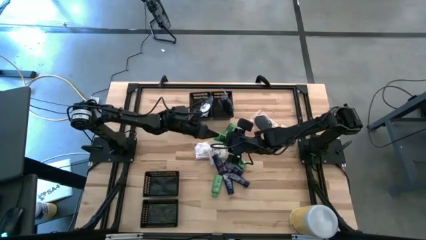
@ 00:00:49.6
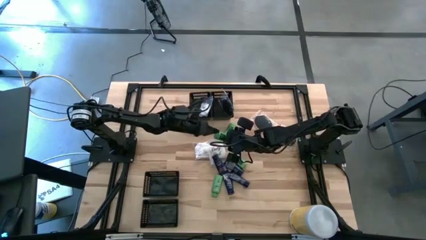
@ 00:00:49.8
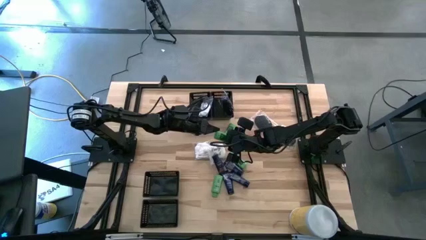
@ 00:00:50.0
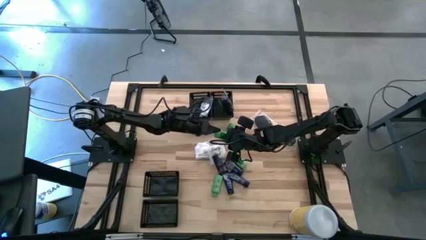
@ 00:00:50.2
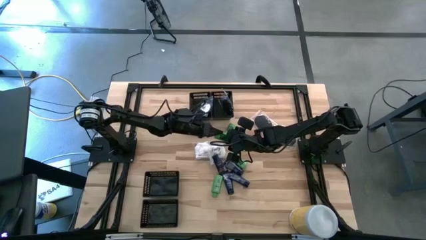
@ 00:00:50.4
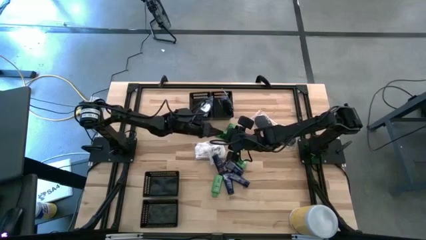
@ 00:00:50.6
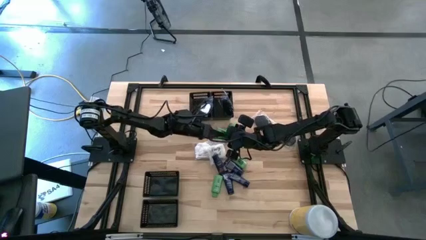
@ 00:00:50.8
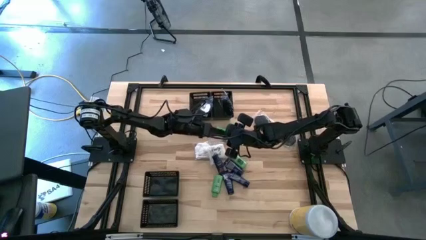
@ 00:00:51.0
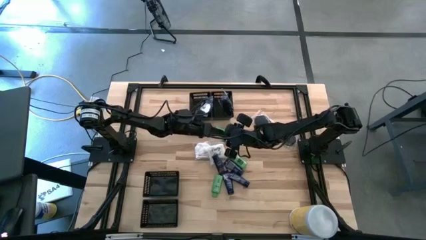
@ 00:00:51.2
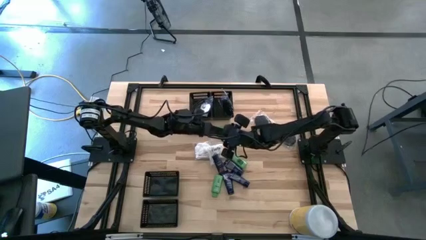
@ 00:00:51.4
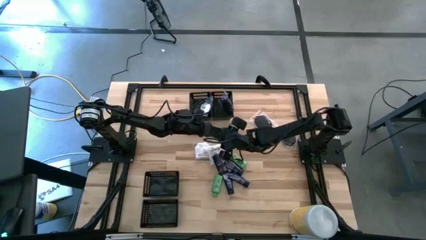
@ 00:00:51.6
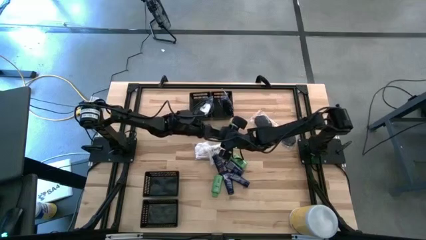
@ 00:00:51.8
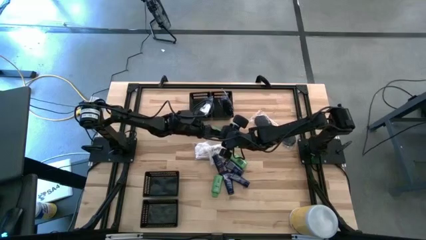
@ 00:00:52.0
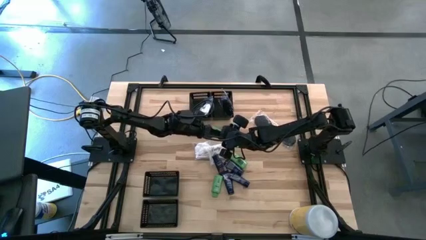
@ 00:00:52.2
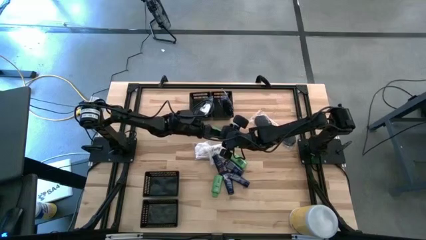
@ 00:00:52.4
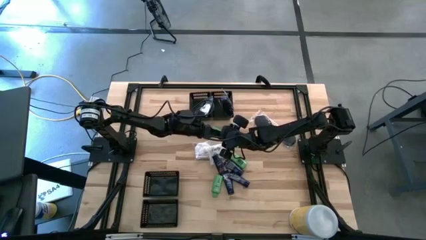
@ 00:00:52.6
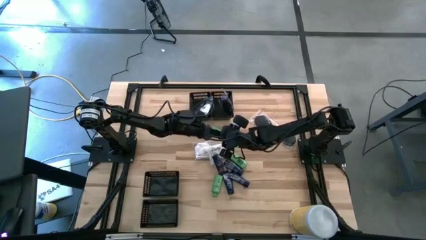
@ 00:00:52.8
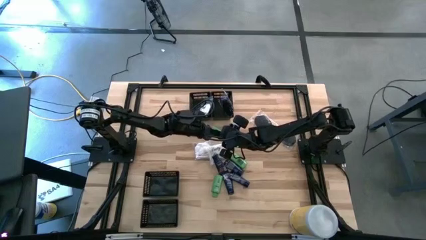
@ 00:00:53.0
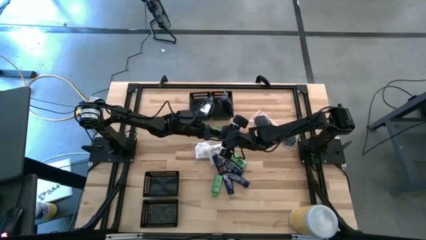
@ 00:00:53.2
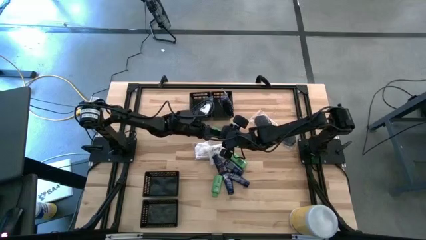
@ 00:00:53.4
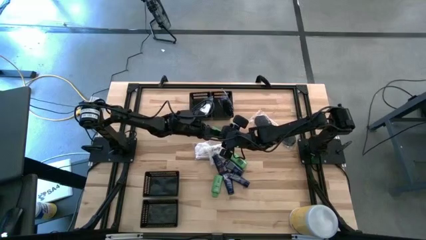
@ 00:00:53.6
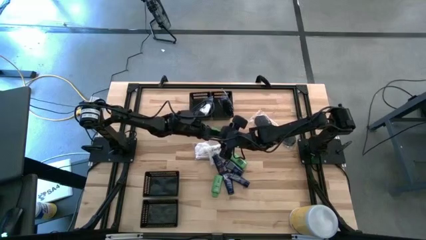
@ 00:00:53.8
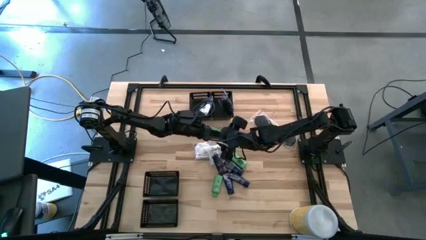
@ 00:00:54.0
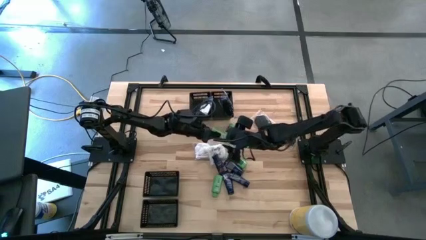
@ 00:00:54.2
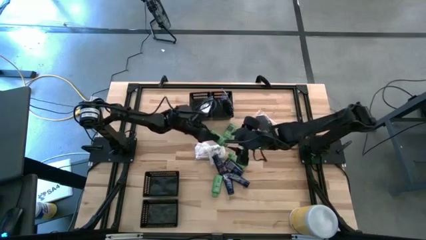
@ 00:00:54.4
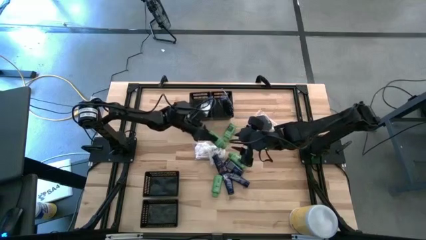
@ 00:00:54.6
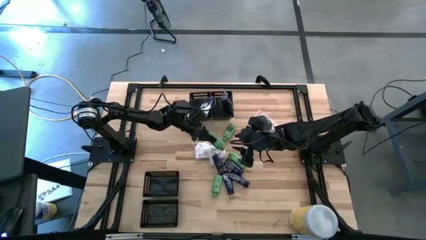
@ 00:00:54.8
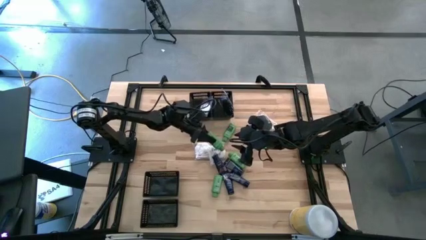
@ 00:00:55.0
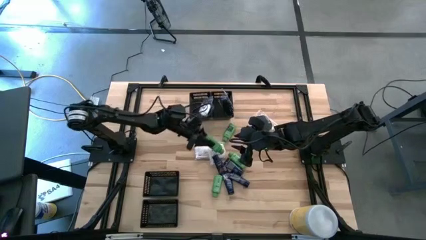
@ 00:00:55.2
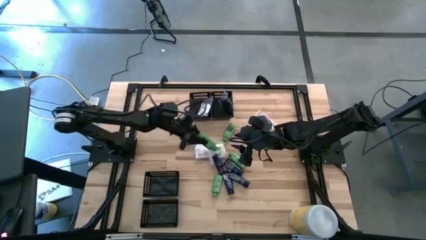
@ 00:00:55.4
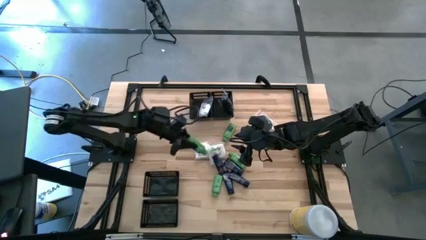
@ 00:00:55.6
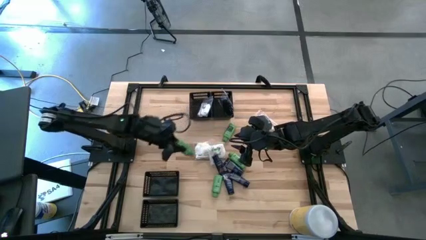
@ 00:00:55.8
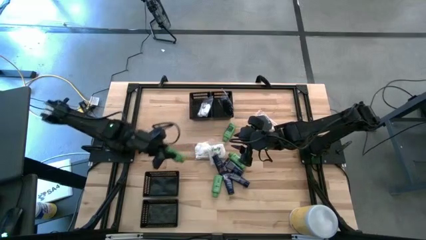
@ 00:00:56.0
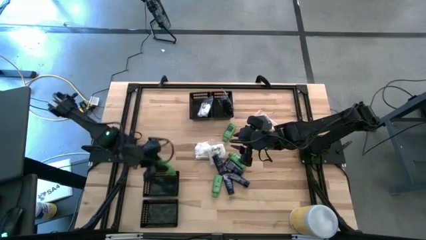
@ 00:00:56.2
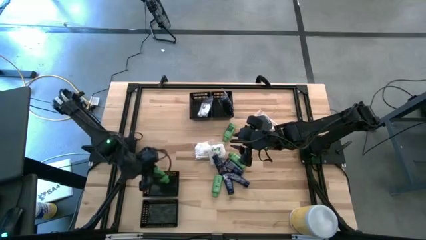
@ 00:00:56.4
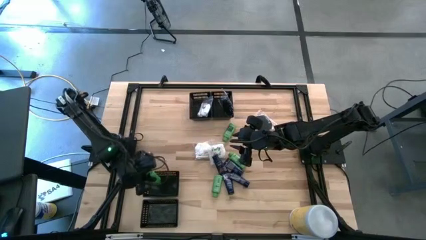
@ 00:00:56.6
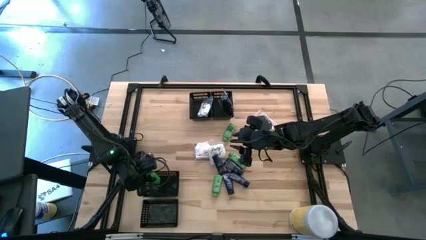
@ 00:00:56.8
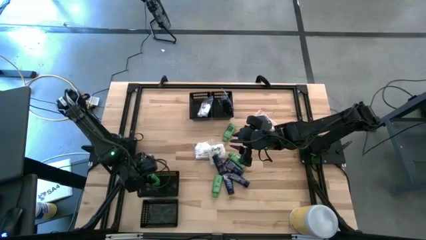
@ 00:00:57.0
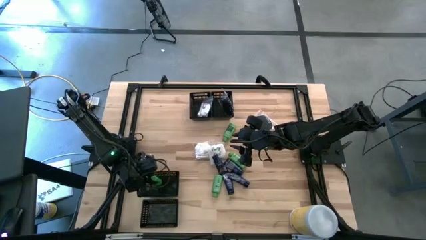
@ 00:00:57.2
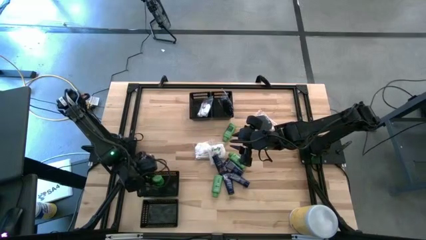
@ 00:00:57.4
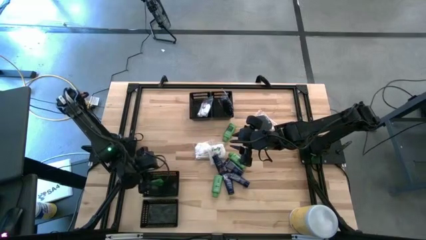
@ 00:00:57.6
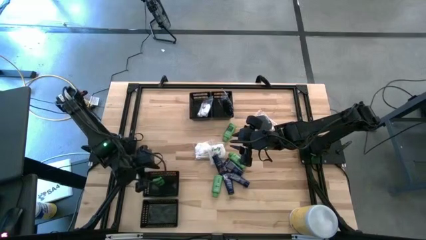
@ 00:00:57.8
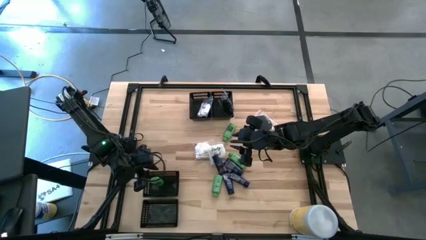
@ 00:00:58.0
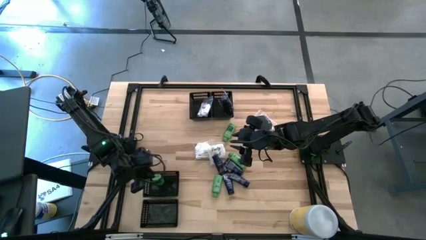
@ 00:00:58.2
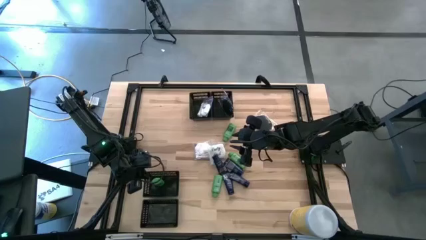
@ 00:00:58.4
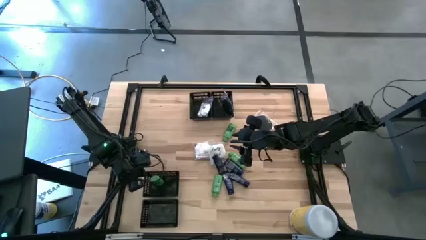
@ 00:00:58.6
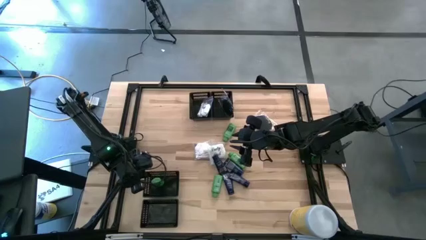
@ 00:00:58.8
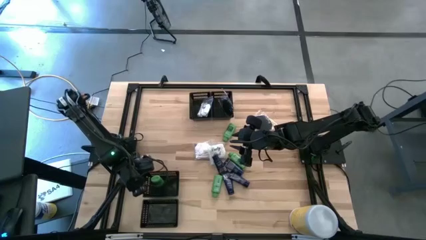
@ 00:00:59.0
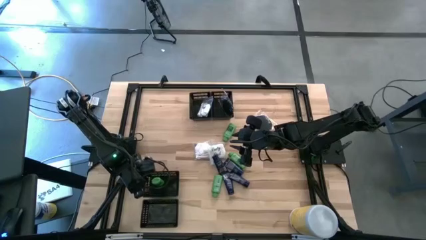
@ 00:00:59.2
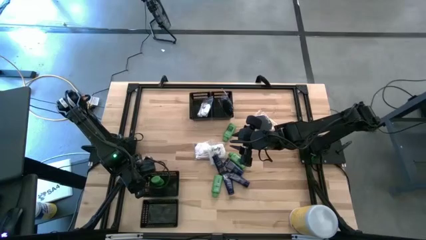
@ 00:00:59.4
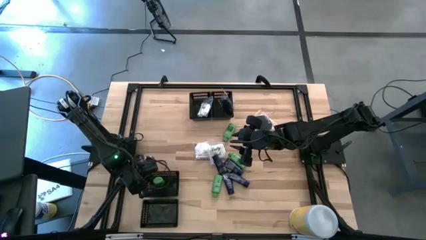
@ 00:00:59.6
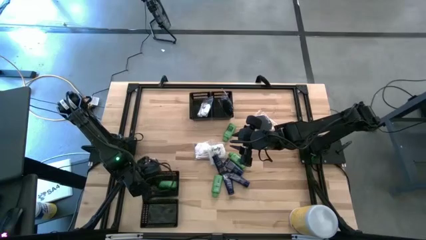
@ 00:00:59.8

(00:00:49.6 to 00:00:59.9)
Task: Pick & Place Travel size toiletries
Put the green shampoo into the middle left basket

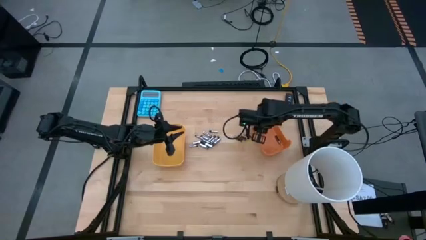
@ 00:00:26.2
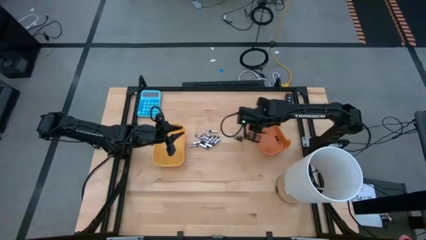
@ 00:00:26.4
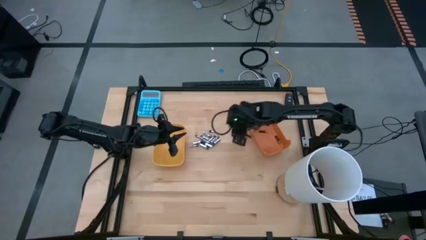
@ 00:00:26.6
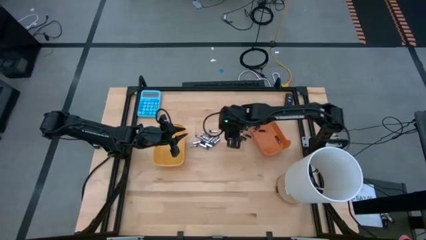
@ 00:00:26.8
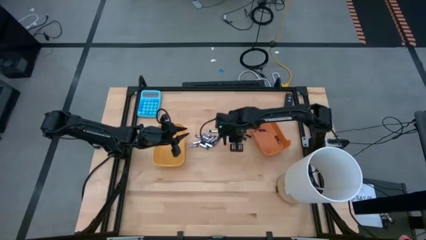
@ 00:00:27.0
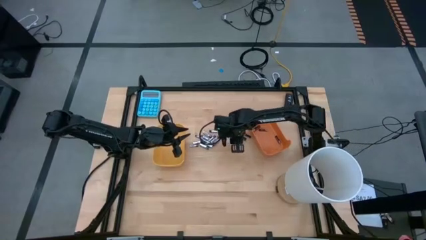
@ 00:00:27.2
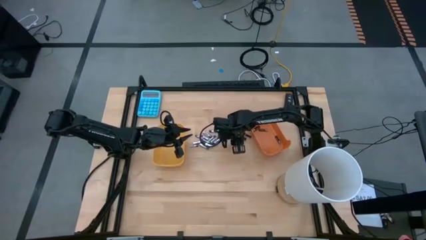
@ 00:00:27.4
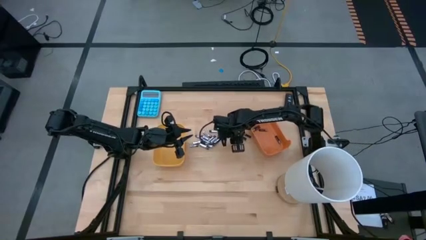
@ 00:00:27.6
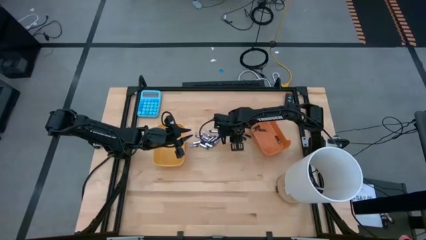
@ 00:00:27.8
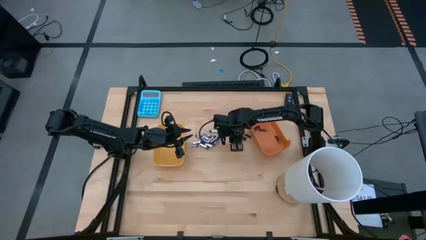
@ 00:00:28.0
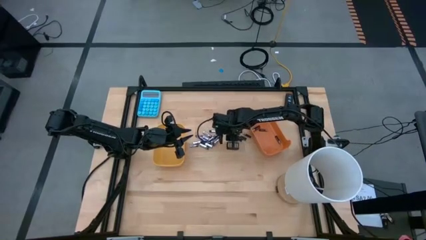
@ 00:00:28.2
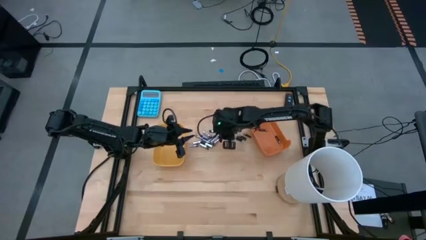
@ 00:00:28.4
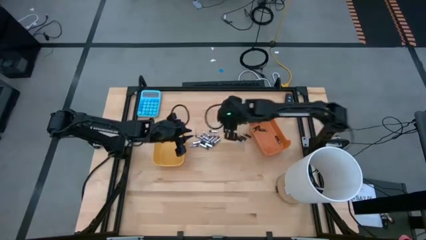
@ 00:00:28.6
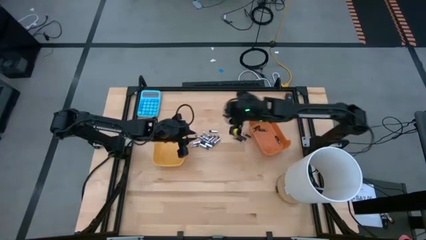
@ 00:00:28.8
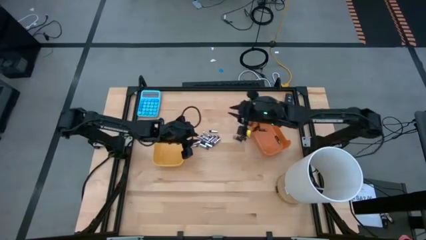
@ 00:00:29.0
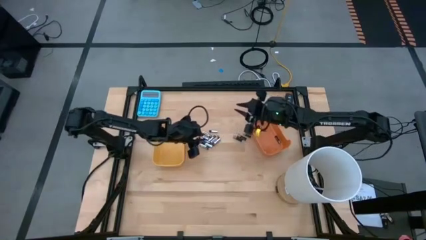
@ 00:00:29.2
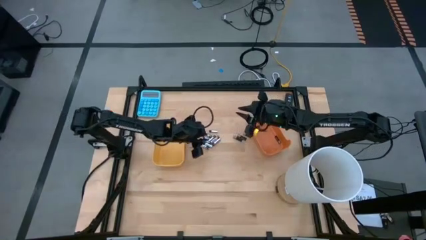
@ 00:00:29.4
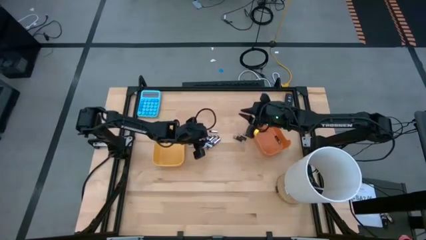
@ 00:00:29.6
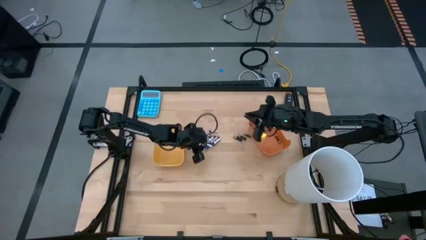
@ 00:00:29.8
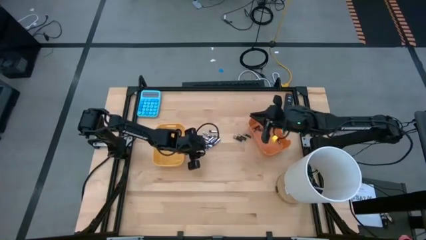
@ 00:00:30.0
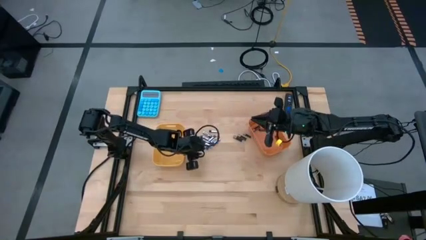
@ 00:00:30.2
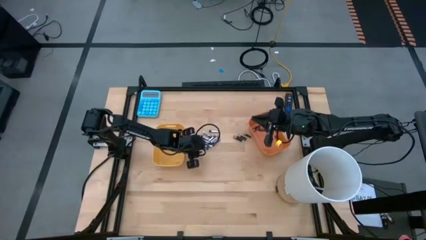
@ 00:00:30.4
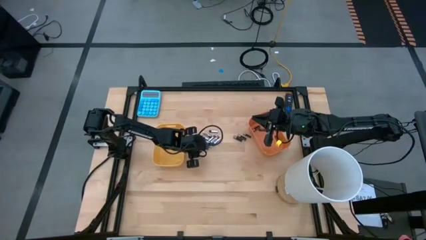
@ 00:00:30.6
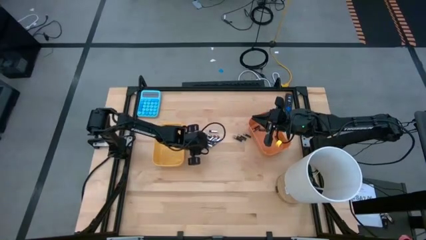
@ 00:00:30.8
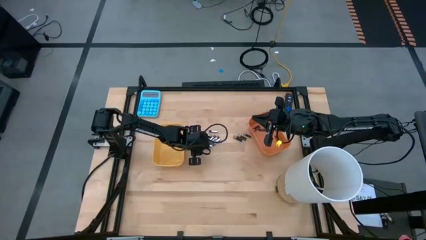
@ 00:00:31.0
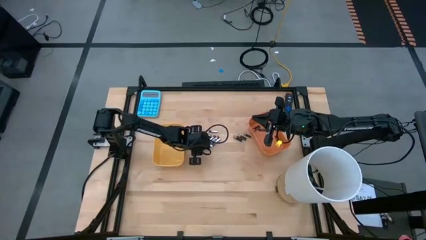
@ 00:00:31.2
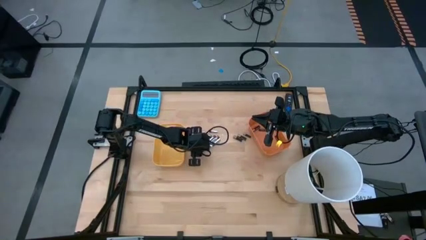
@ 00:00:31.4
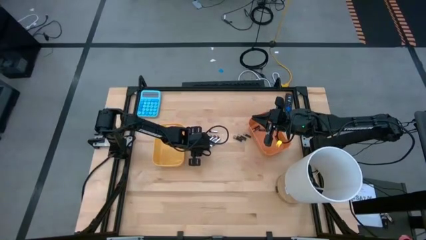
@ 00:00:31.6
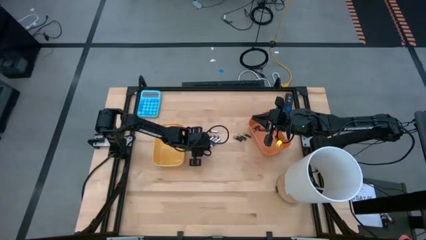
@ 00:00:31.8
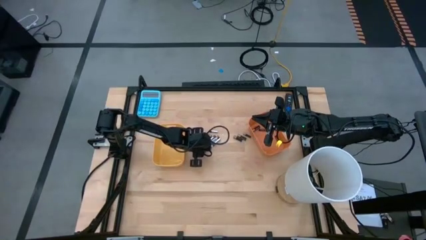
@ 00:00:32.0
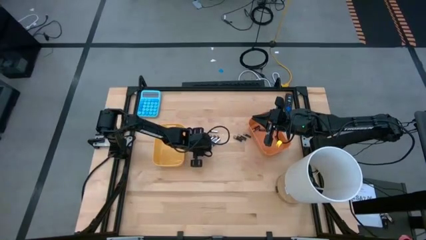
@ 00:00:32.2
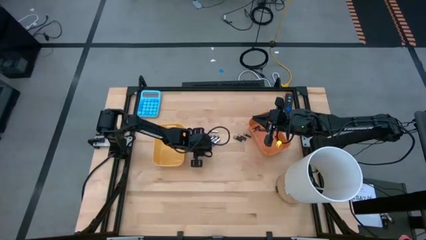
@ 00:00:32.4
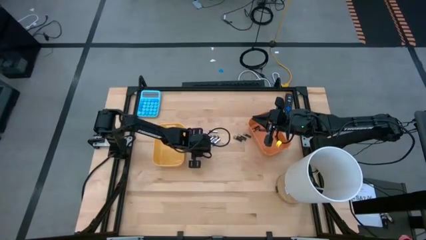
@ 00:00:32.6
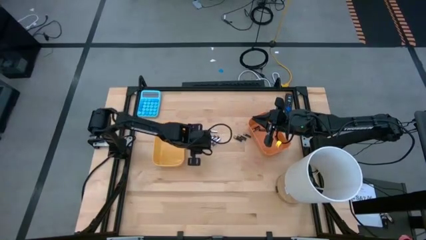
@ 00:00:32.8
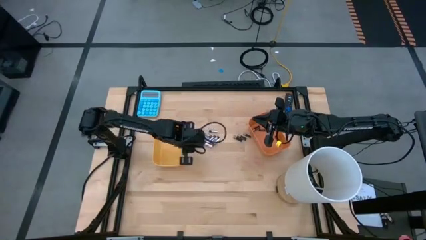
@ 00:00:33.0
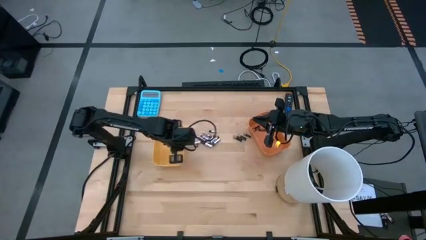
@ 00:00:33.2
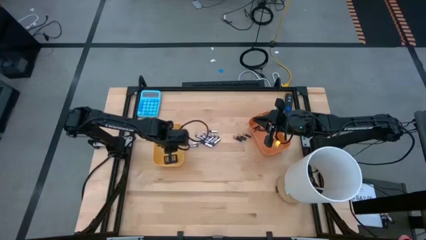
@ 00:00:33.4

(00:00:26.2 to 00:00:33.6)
Task: Sort batteries
Put the silver battery into the yellow bin
